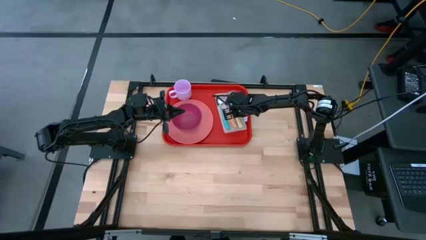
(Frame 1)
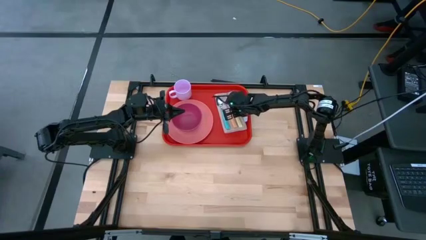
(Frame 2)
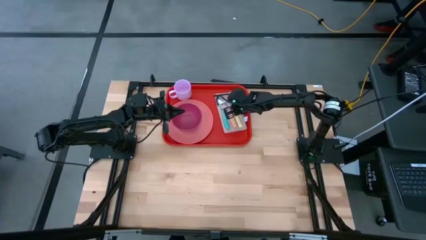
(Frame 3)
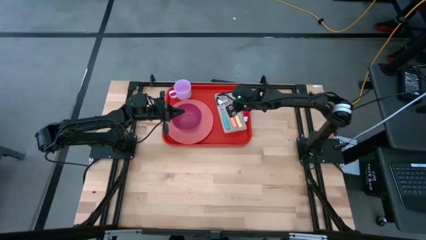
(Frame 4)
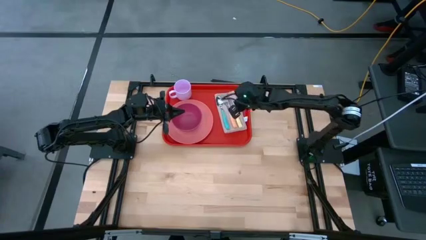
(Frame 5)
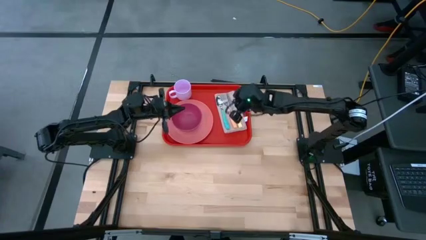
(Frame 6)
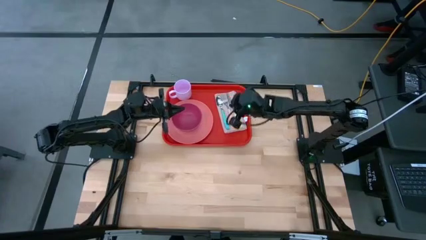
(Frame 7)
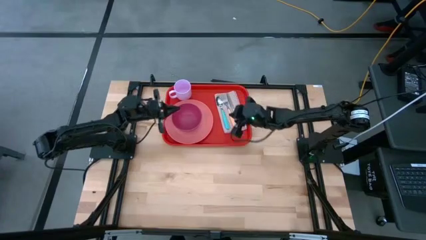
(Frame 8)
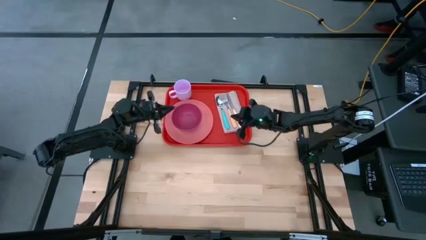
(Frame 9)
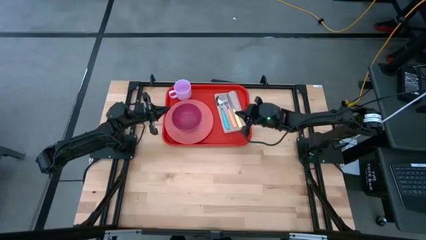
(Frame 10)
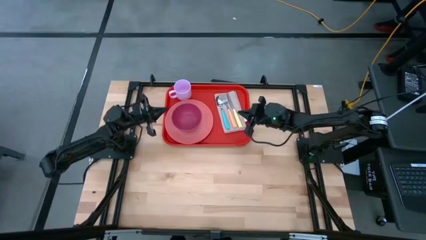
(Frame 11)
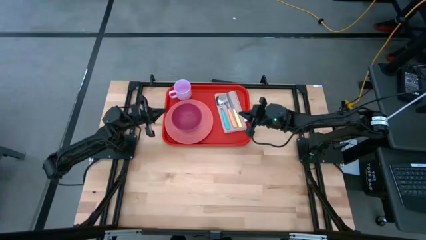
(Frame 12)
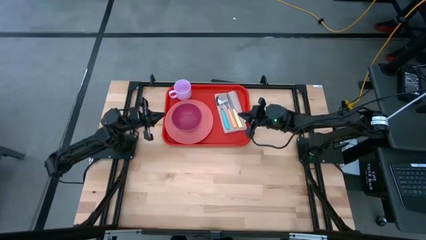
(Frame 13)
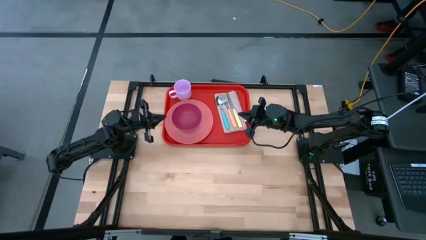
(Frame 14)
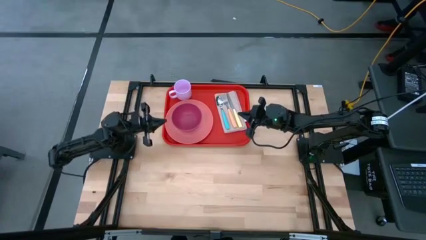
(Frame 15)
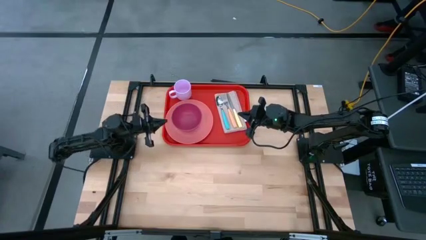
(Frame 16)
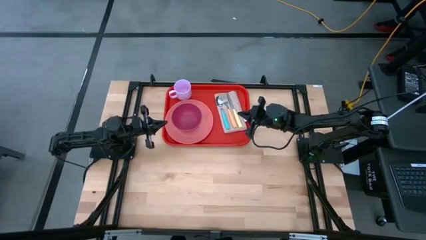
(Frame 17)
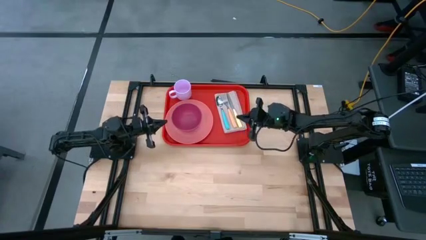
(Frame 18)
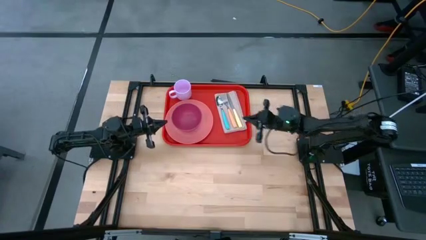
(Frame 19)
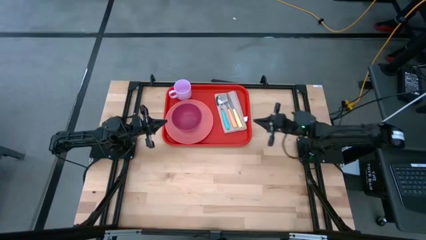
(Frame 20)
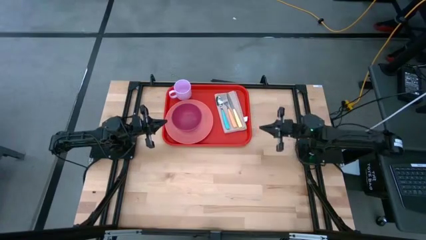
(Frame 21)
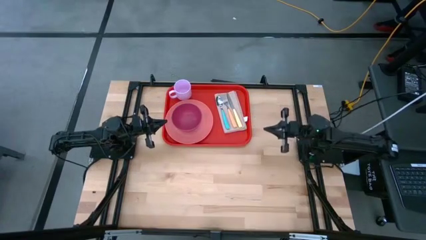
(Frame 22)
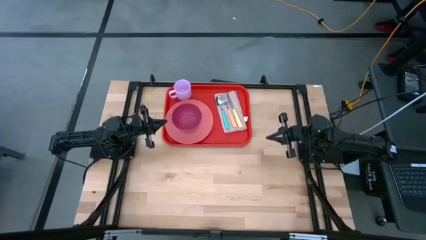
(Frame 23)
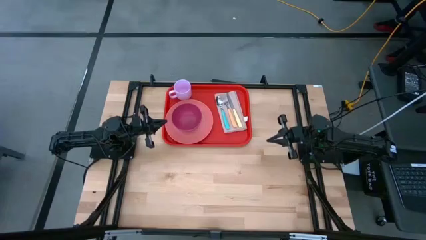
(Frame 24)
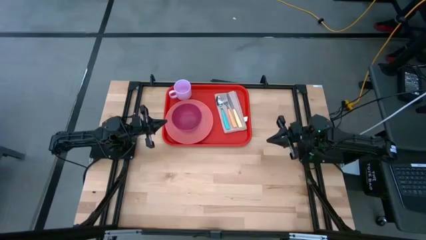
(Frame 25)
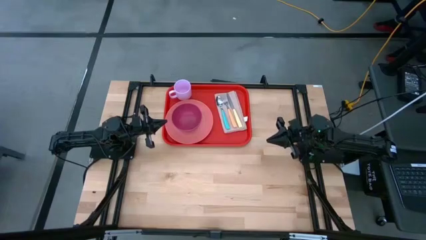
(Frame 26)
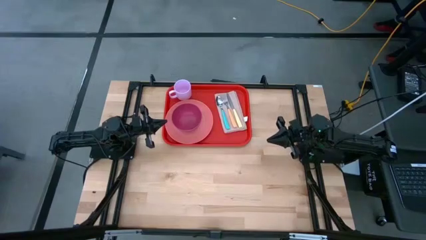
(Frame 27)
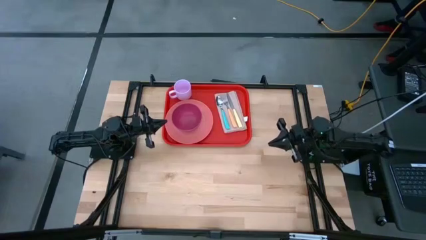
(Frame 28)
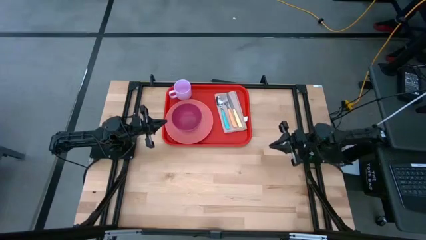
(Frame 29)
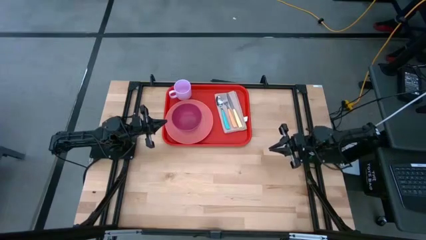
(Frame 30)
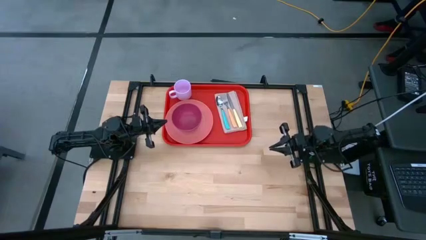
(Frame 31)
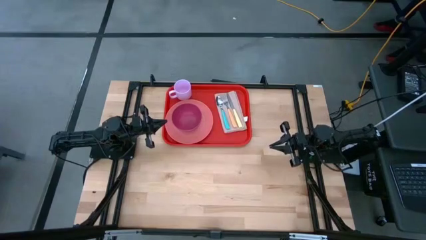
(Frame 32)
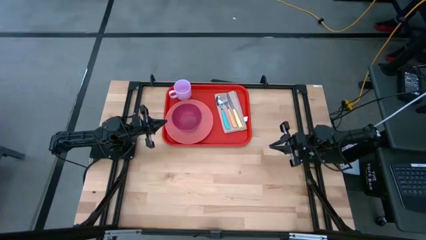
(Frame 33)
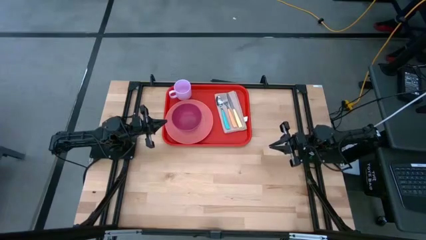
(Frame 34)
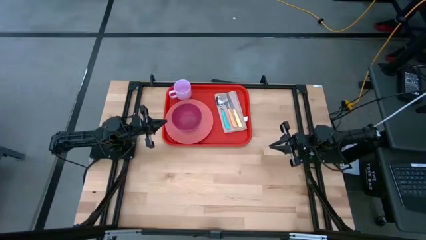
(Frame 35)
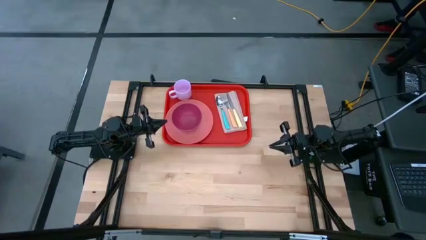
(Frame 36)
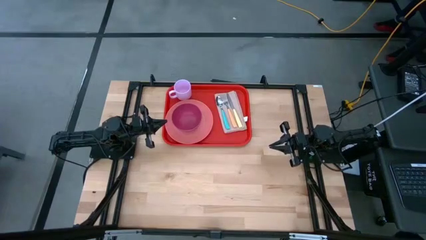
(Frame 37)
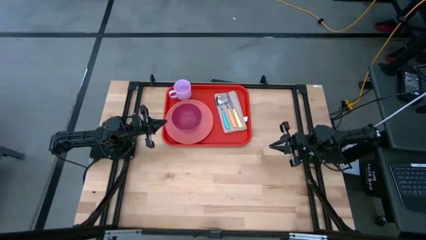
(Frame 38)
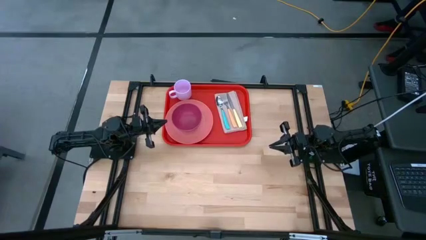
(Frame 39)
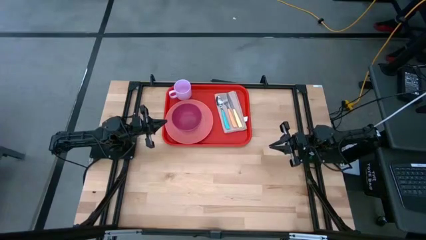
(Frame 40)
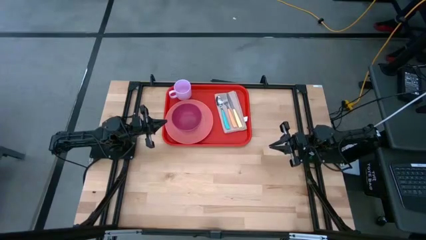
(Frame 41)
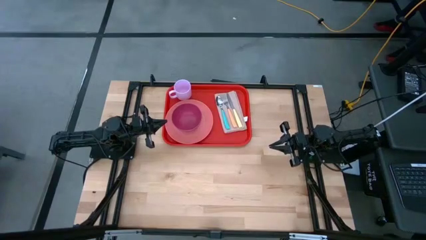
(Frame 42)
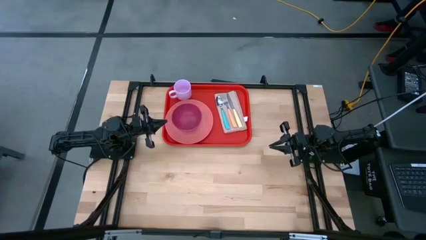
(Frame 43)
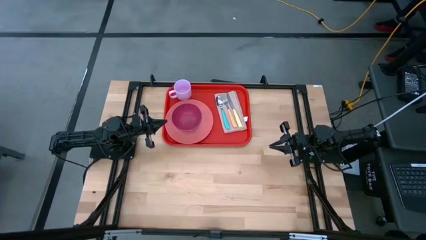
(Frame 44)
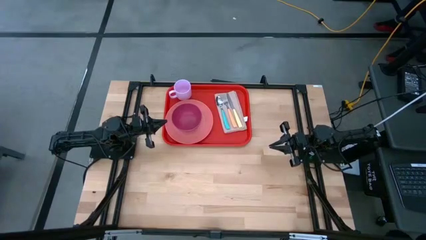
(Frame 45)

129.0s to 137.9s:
Task: Set up tray
Return to Home Position

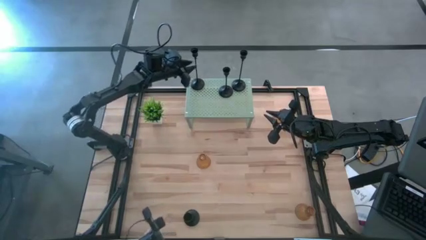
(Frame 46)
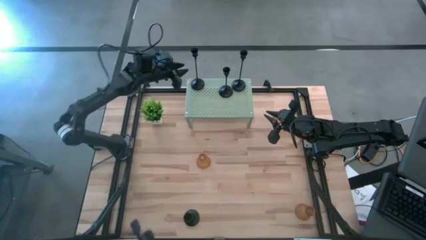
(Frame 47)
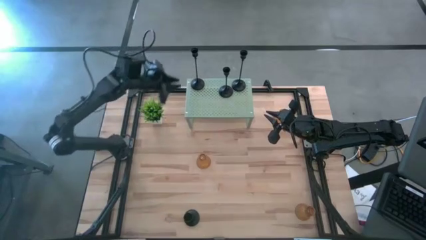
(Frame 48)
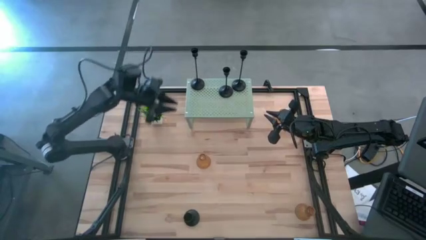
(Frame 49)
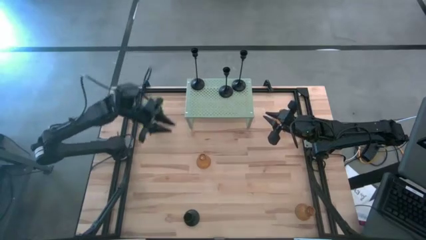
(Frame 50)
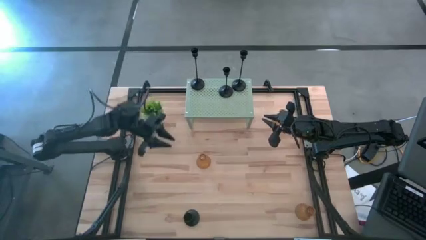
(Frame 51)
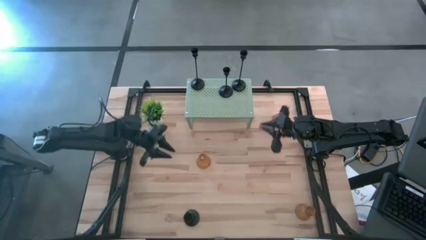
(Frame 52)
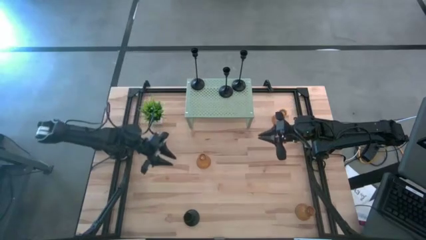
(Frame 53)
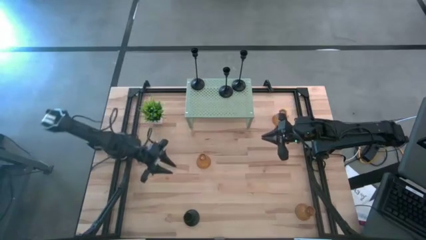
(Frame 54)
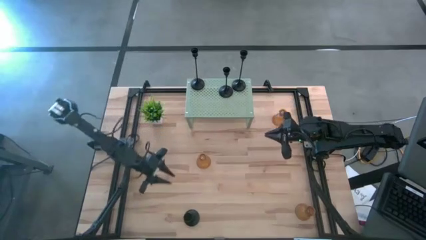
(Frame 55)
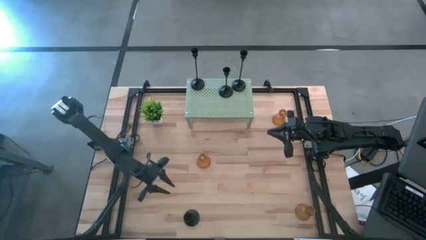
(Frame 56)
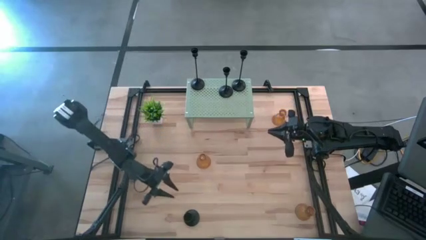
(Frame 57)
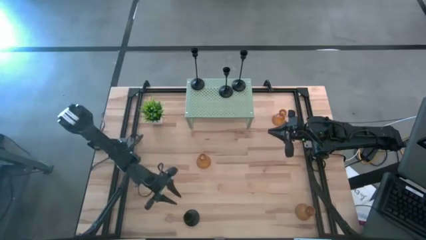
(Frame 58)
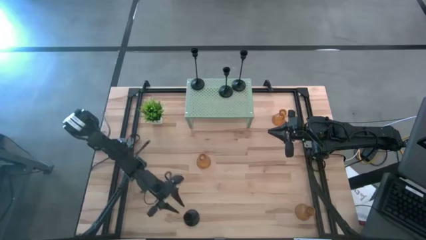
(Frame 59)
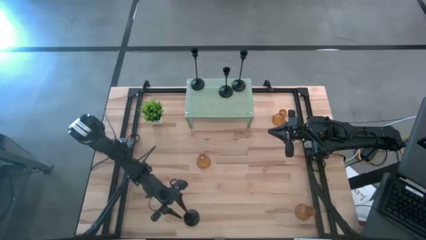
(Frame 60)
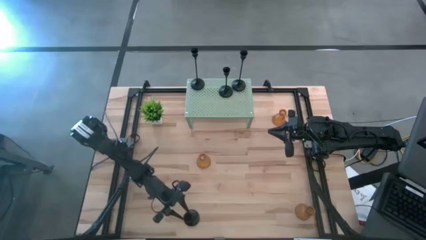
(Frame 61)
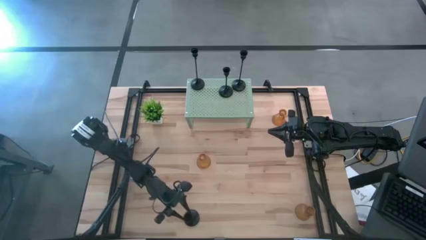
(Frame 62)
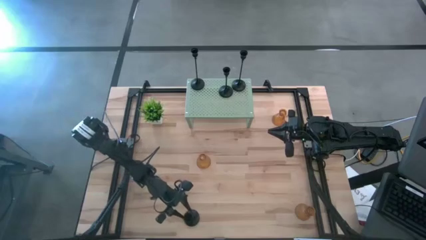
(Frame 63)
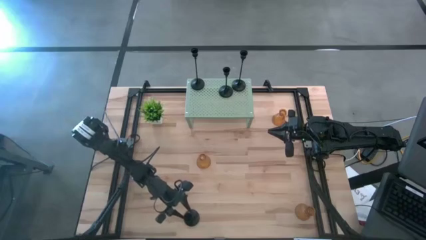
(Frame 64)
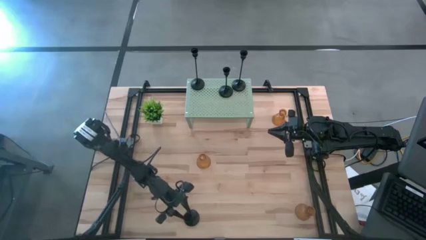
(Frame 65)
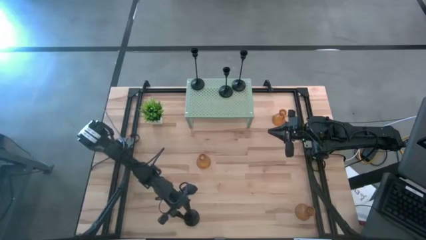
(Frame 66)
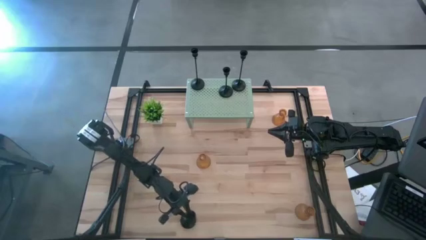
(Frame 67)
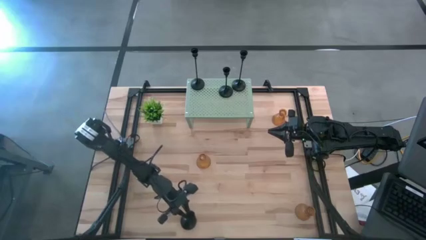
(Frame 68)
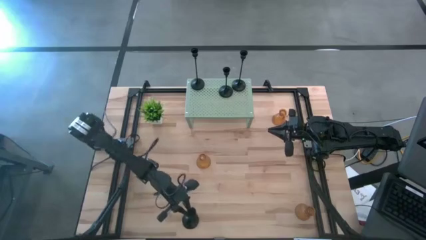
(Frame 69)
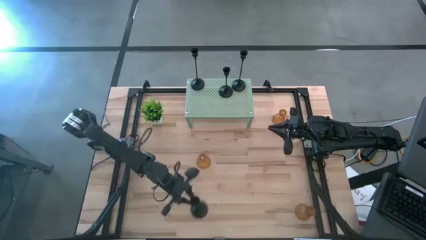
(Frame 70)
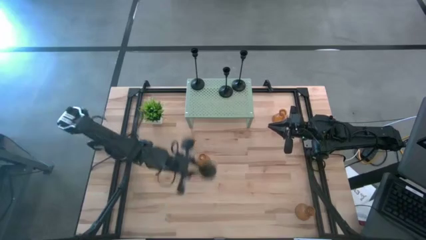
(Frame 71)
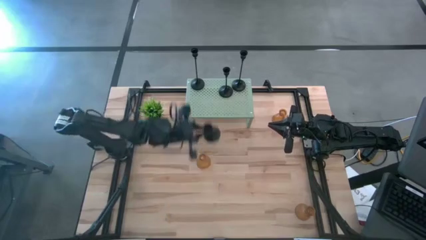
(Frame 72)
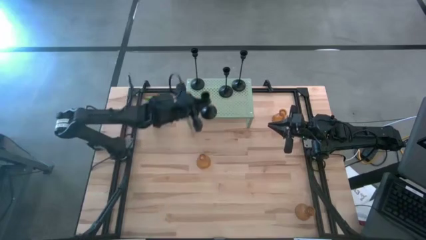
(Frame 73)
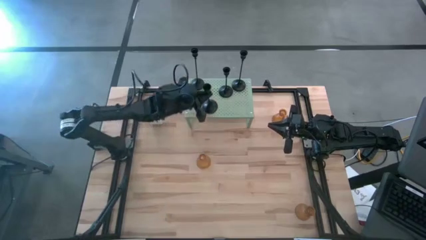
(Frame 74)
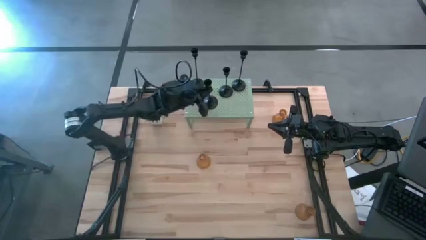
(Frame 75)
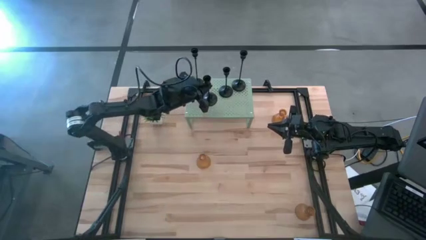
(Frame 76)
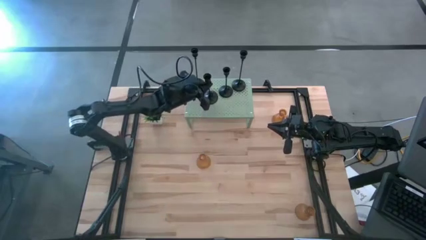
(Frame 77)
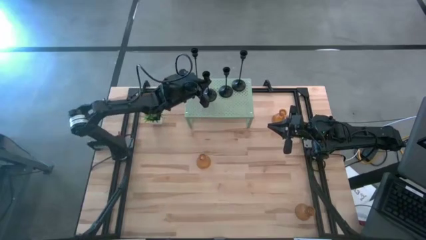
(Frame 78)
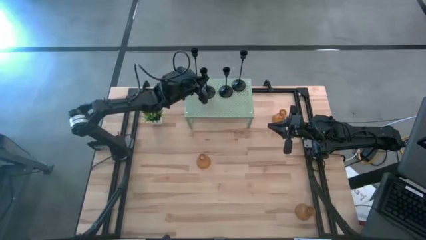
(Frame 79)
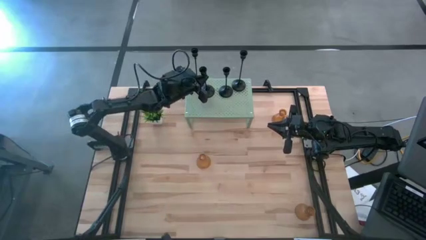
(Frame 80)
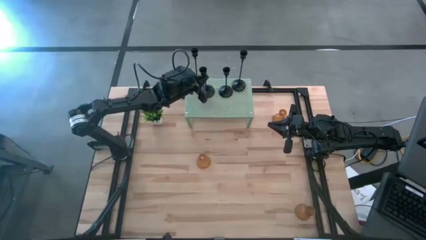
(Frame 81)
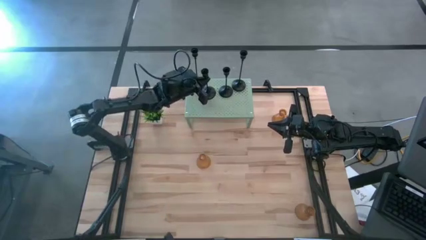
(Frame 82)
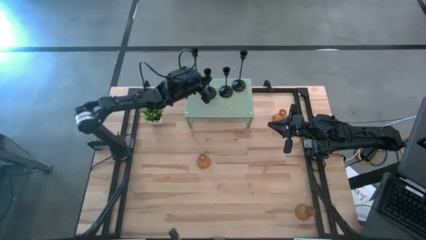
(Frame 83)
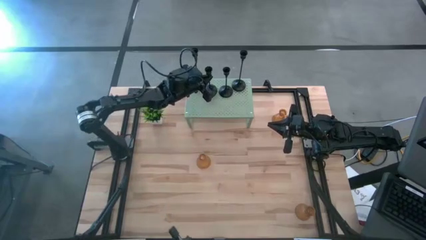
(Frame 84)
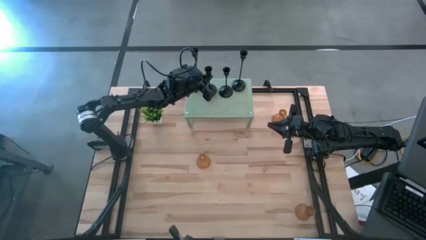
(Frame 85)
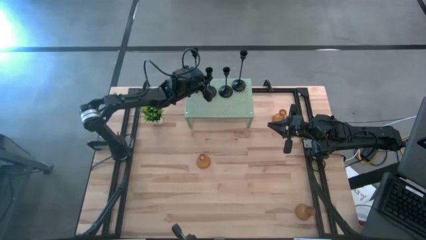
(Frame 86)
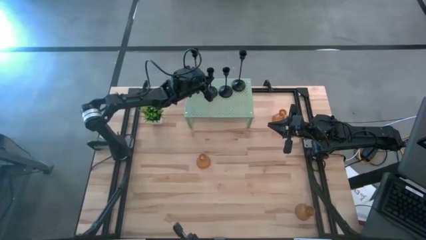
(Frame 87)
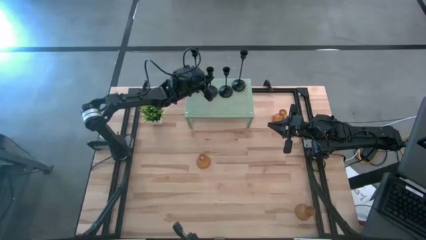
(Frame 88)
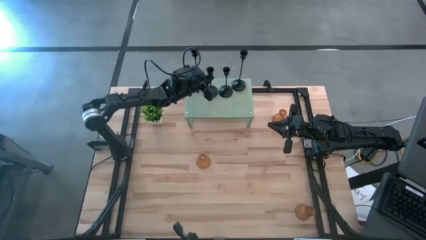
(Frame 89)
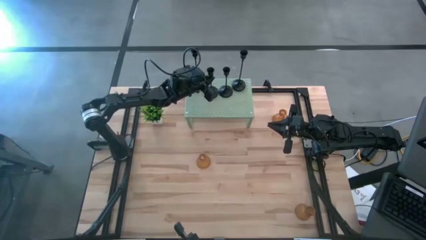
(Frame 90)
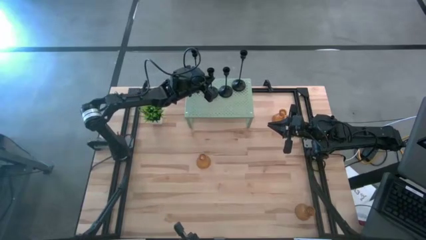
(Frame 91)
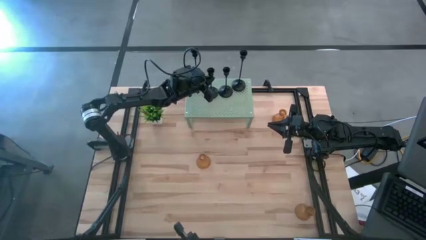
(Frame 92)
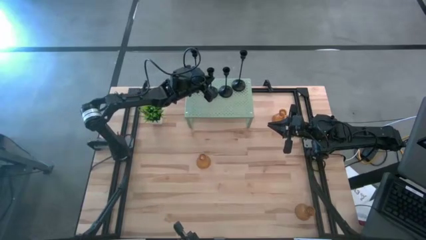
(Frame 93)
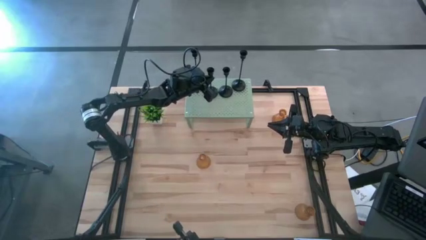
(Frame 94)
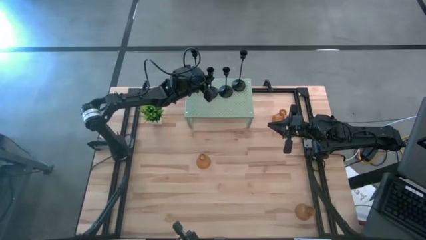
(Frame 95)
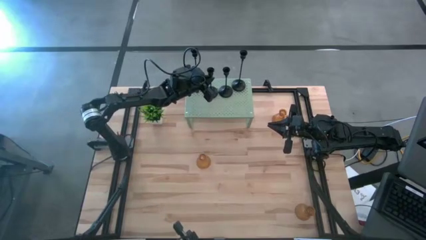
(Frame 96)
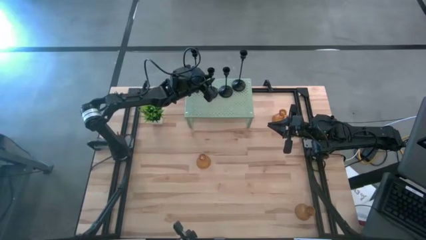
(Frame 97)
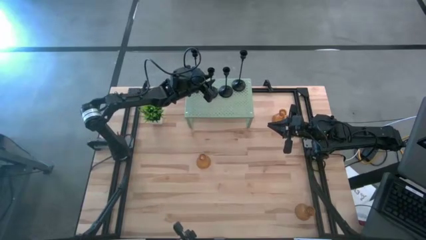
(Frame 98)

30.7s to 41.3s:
Task: Pick & Place candle stick holders
Put the black candle holder on the shelf aligned with the other black candle holders
